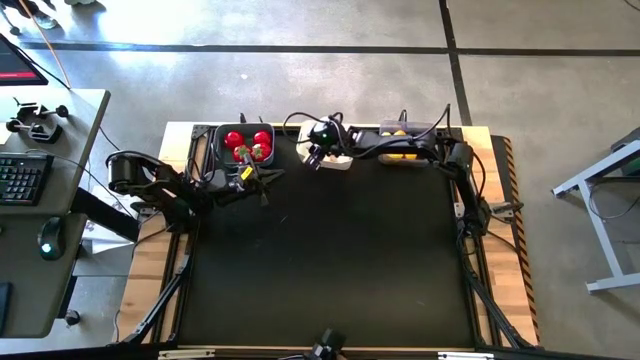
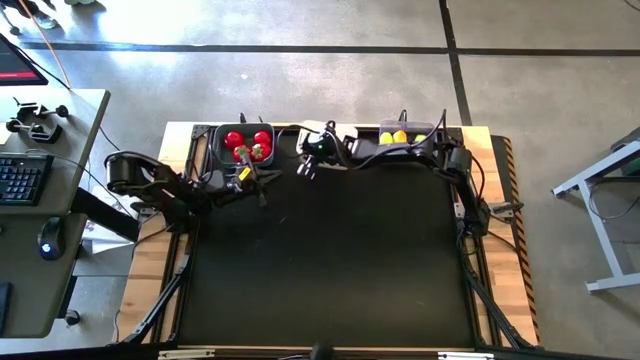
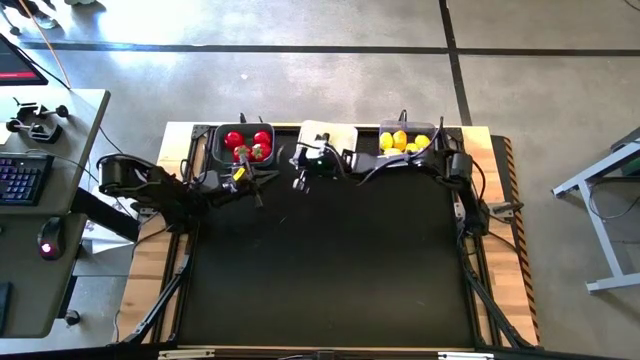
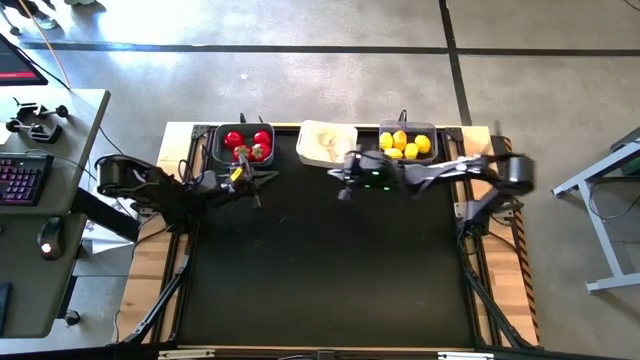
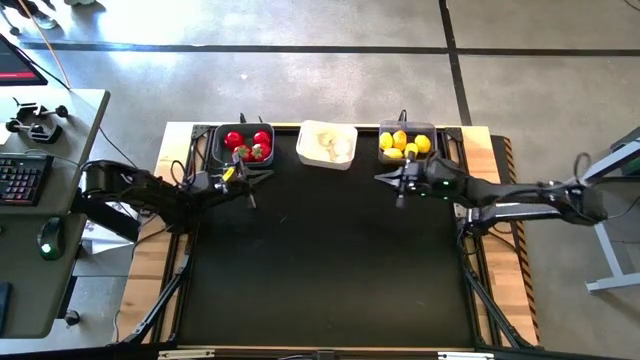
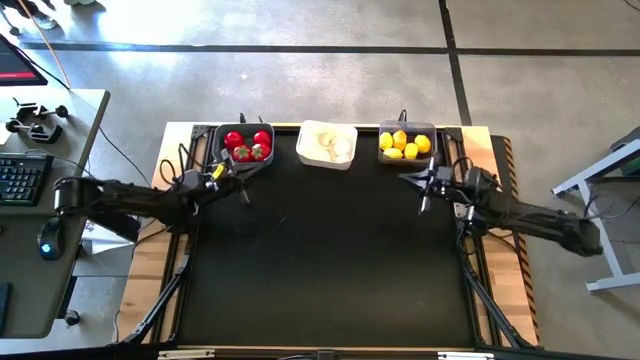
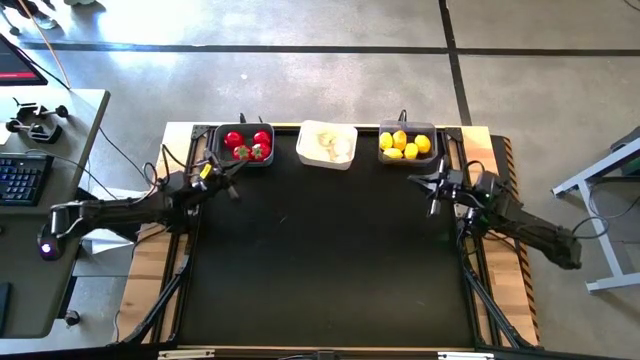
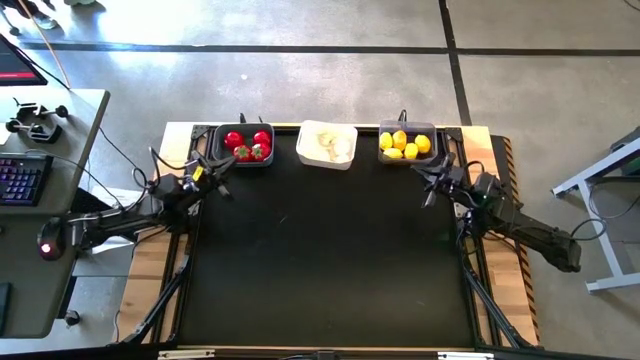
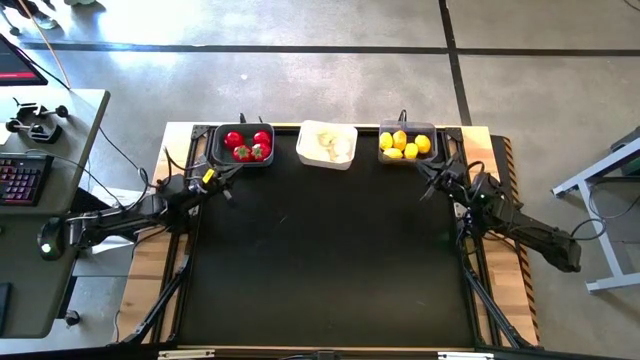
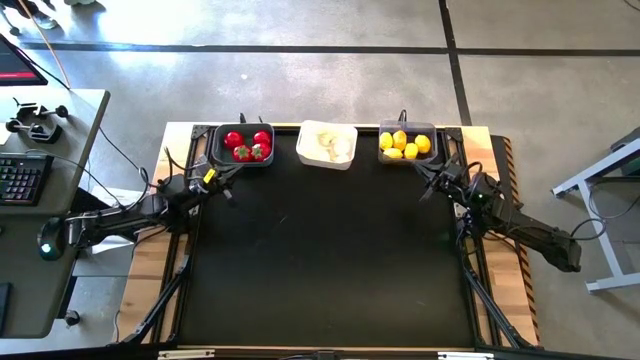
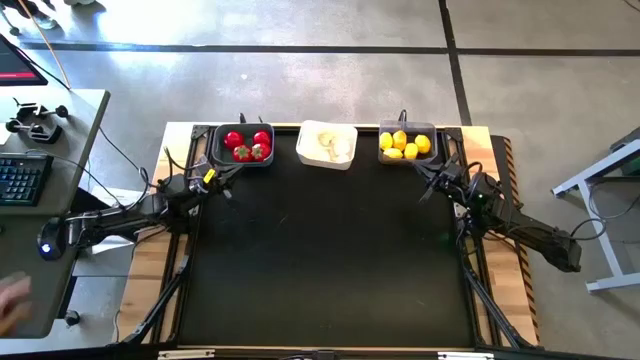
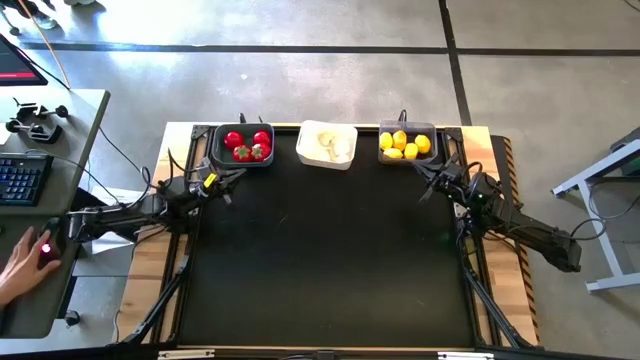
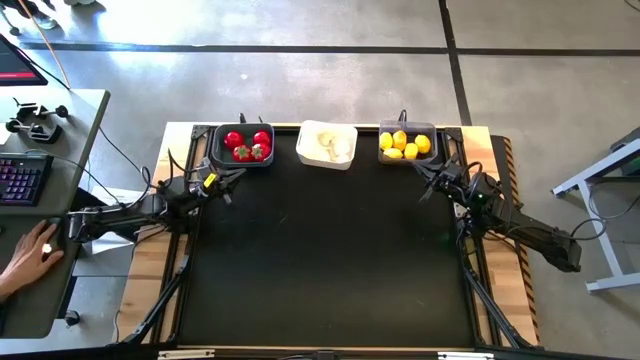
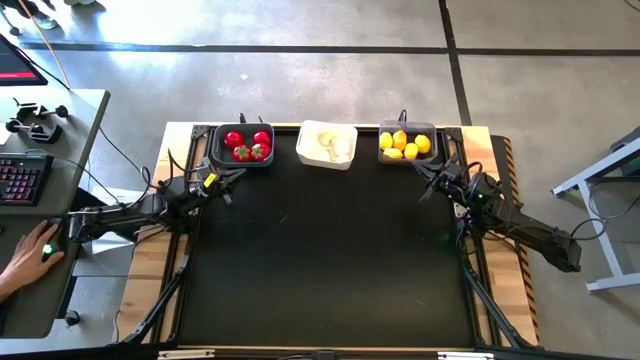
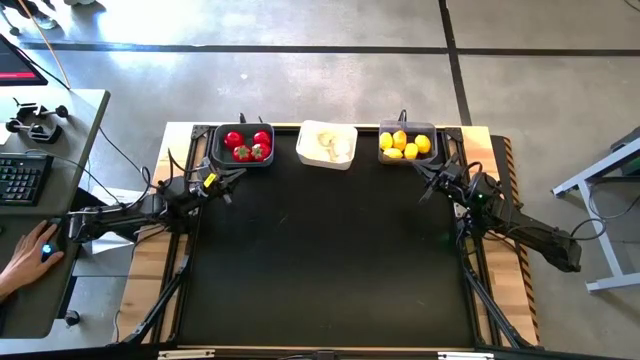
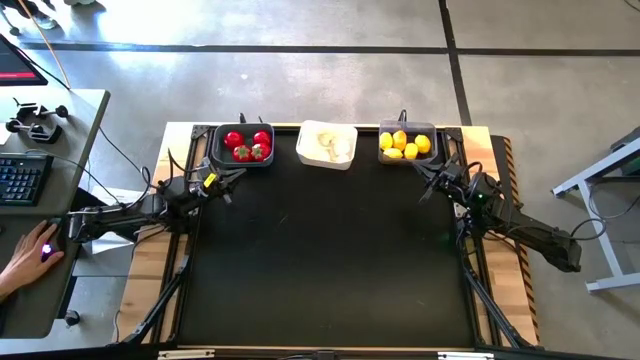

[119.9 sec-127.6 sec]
Task: Sort produce into baskets
Return to Home Position

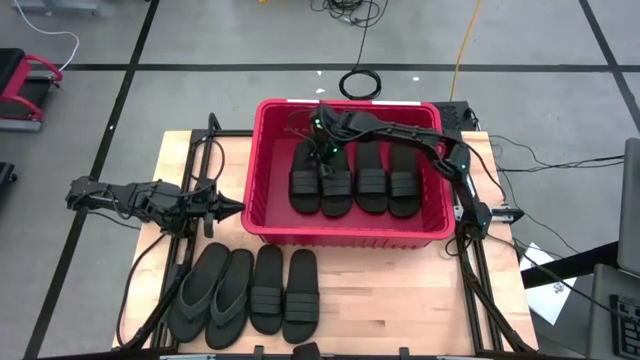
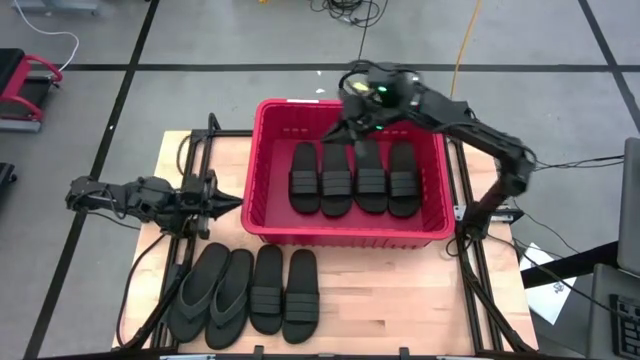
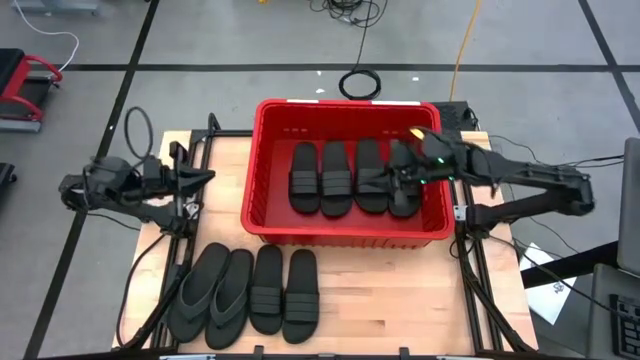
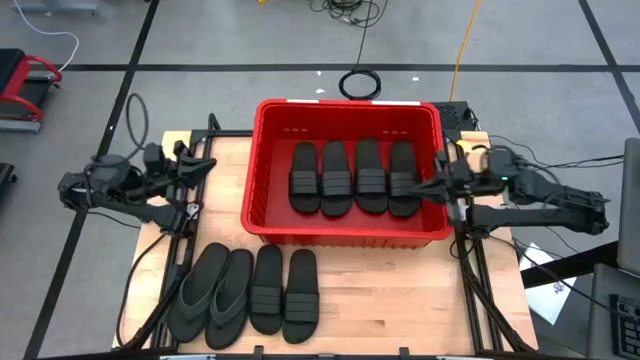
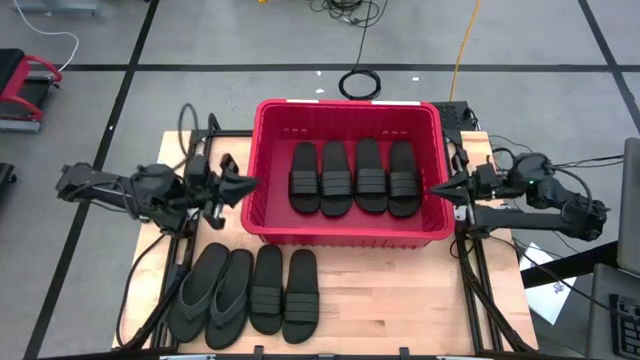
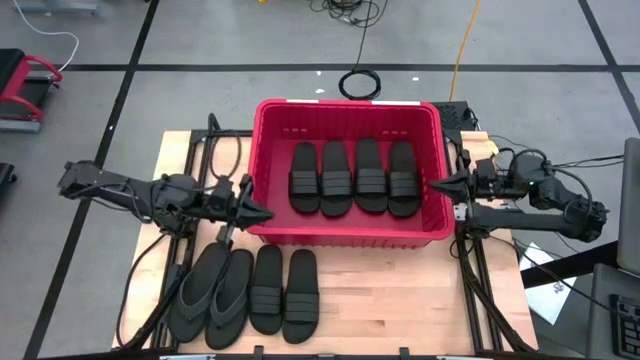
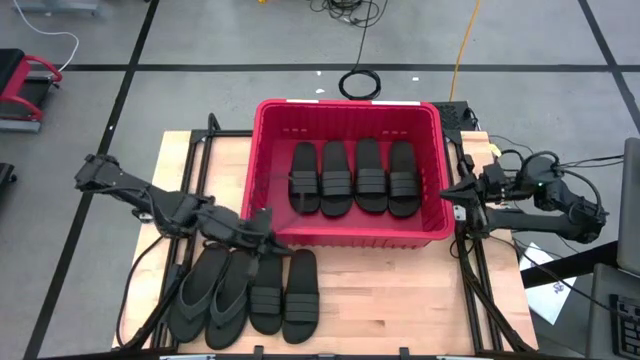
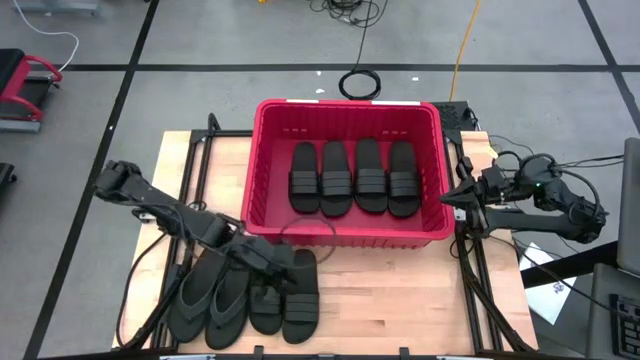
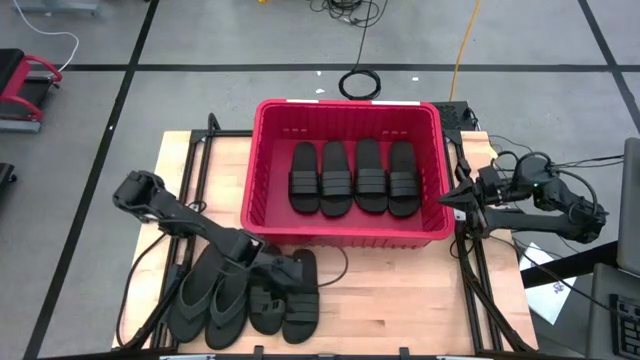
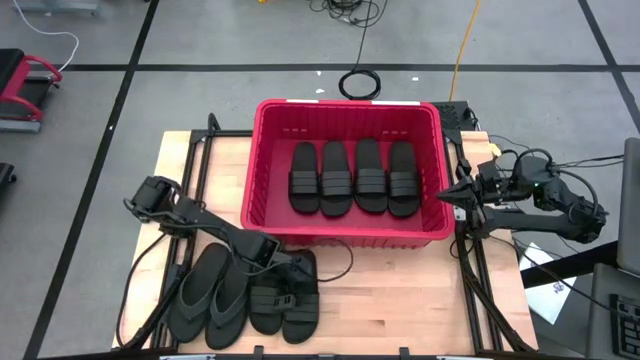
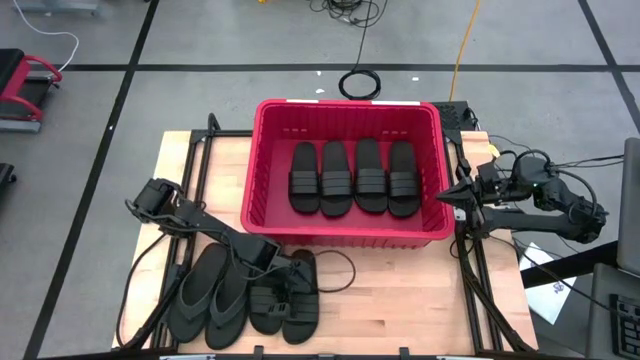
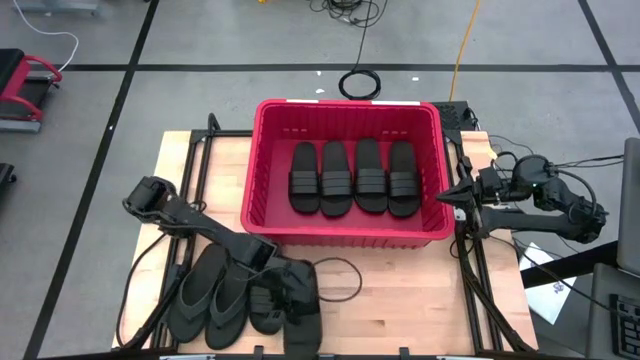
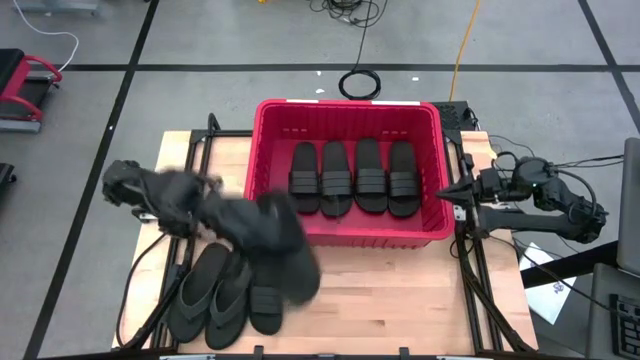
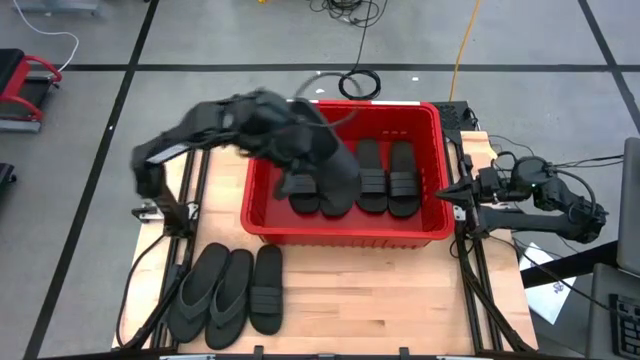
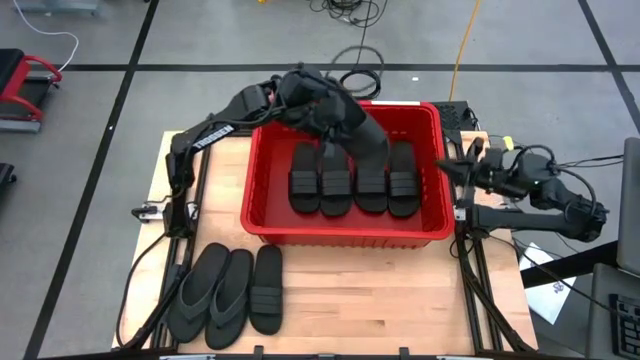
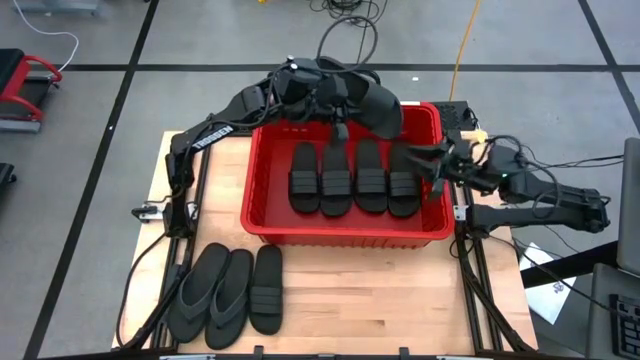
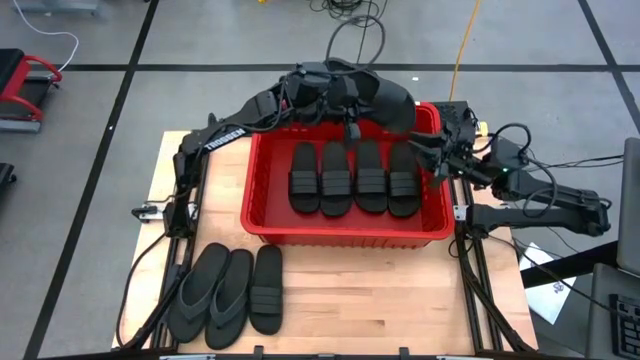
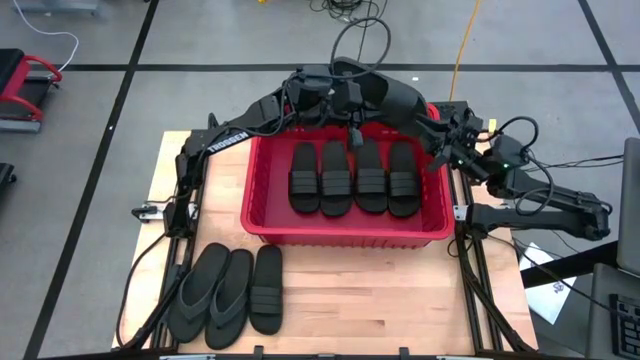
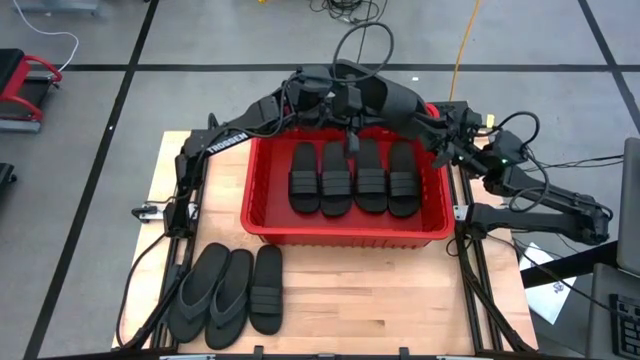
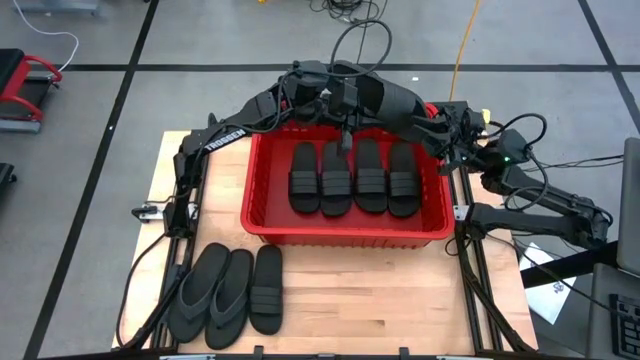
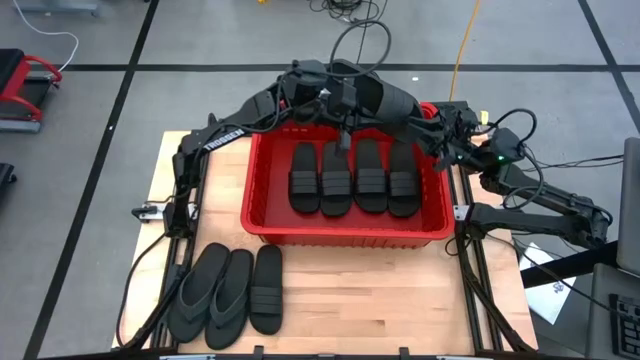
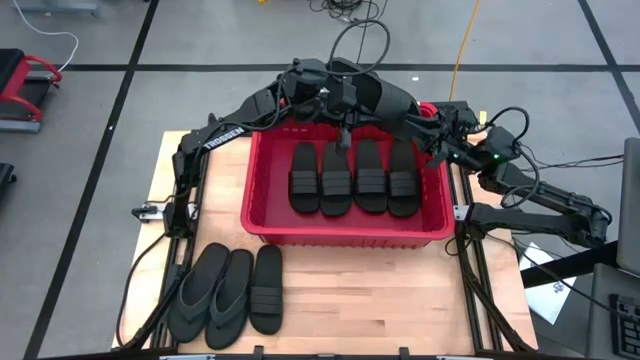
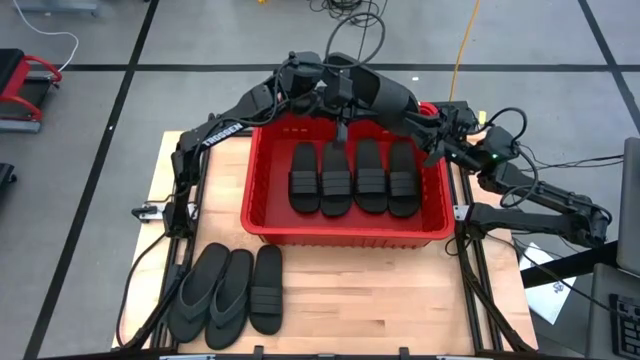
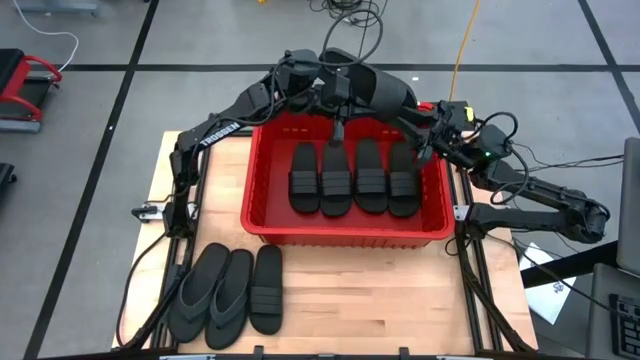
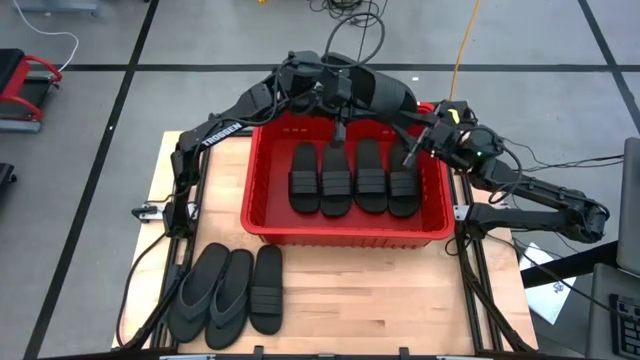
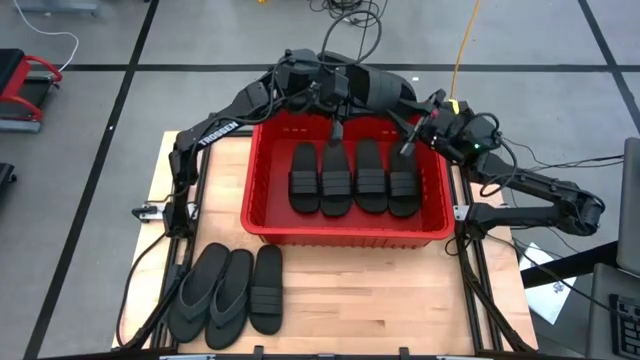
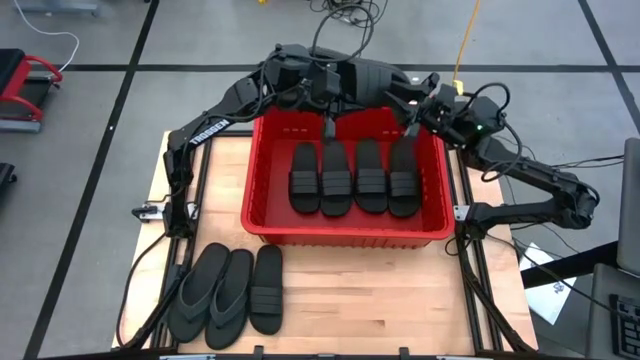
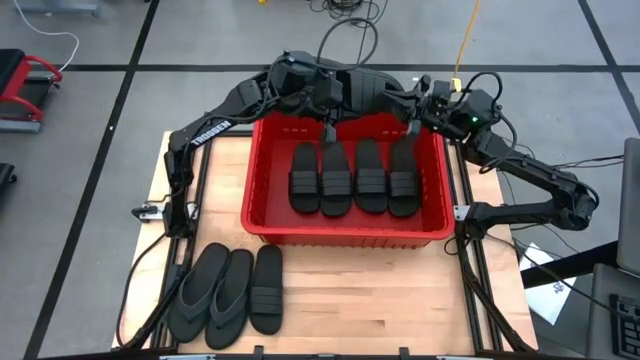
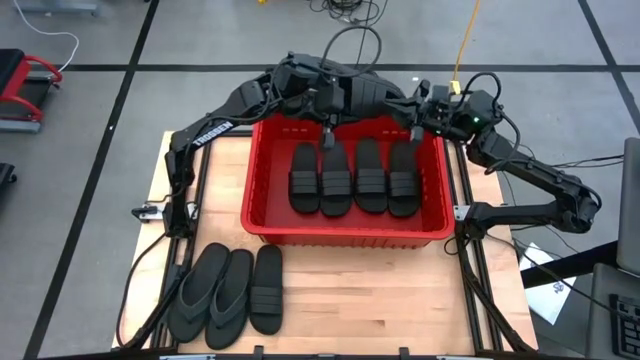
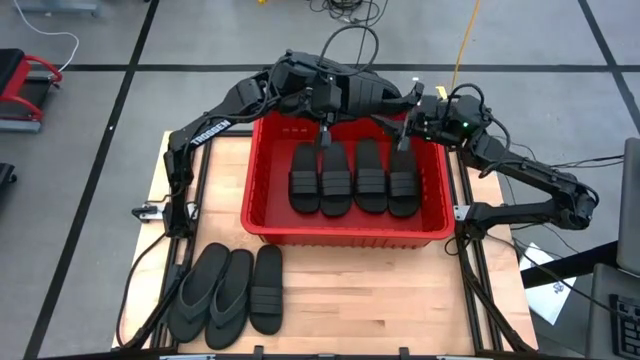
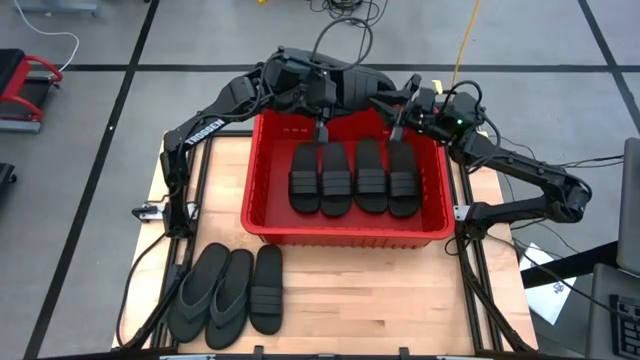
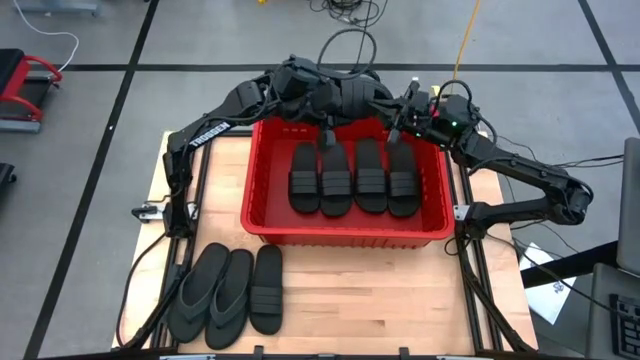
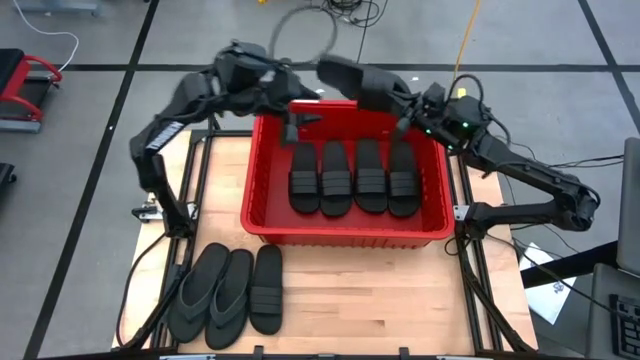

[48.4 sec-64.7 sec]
Task: Pick and place slides into bin
Put the black slipper into the red organizer bin
